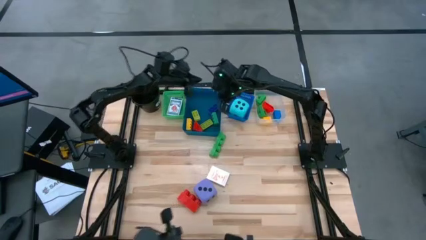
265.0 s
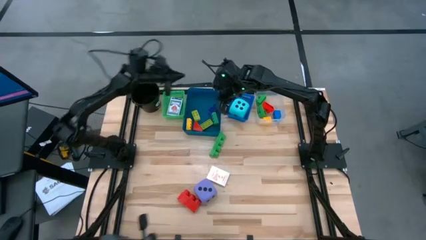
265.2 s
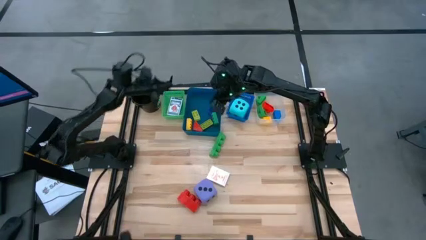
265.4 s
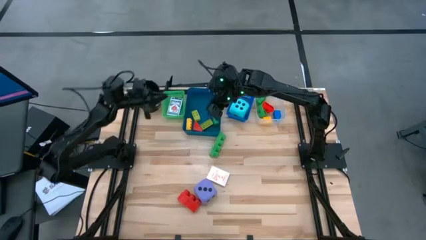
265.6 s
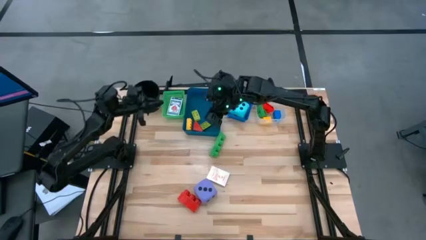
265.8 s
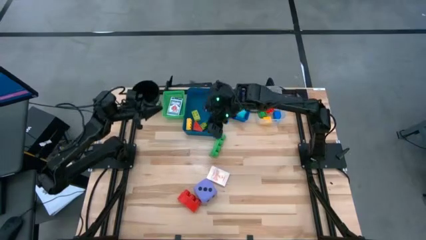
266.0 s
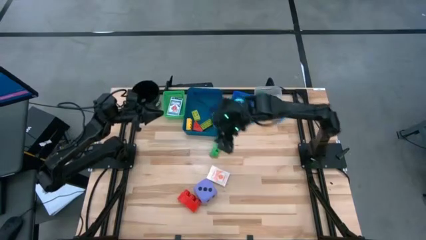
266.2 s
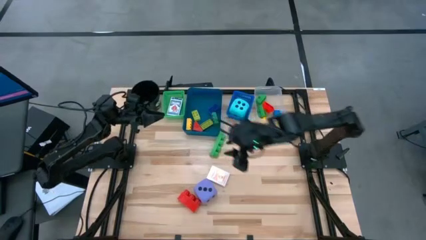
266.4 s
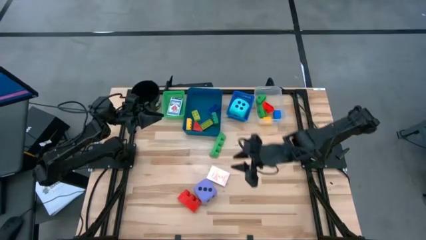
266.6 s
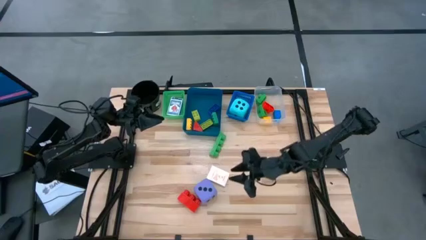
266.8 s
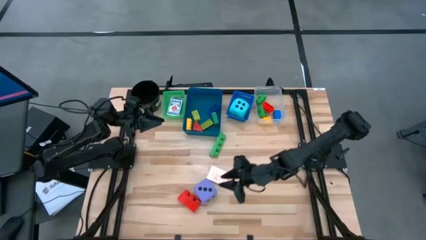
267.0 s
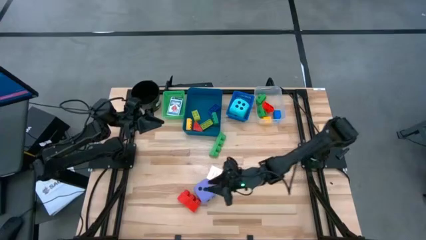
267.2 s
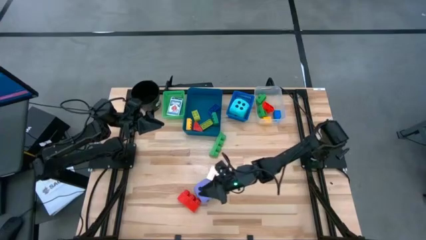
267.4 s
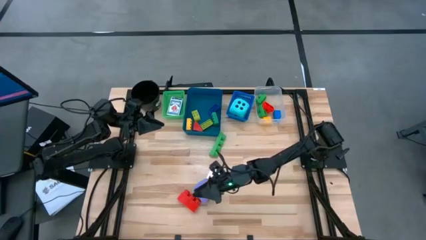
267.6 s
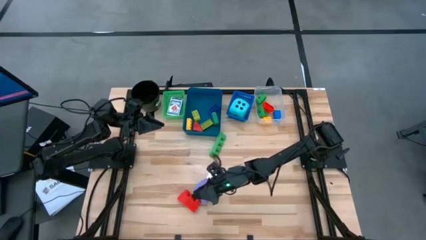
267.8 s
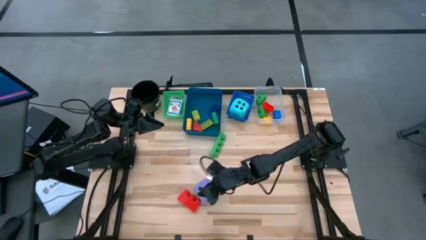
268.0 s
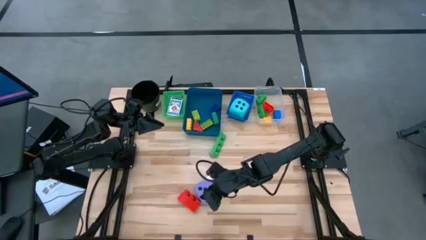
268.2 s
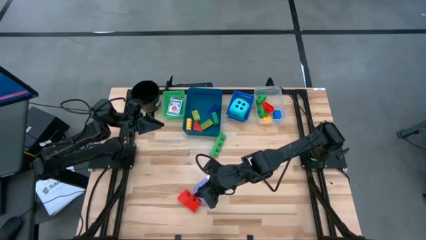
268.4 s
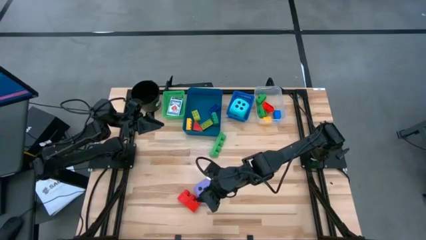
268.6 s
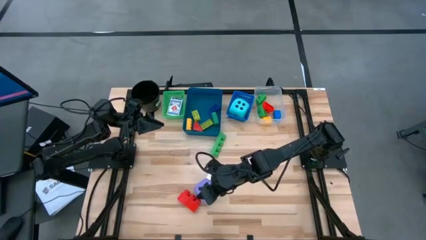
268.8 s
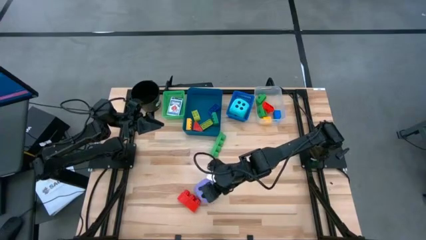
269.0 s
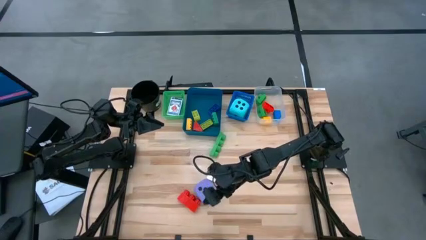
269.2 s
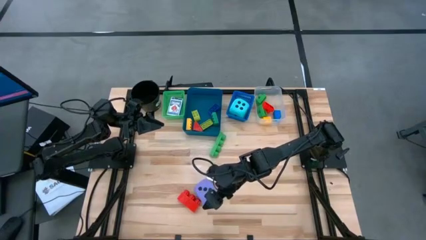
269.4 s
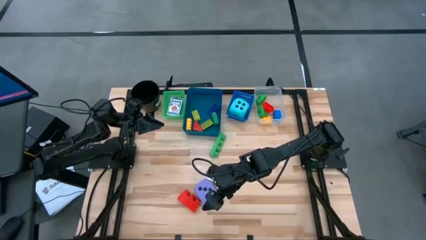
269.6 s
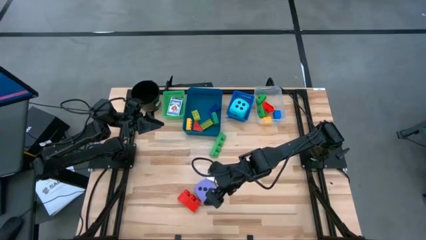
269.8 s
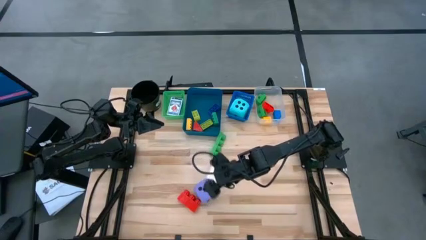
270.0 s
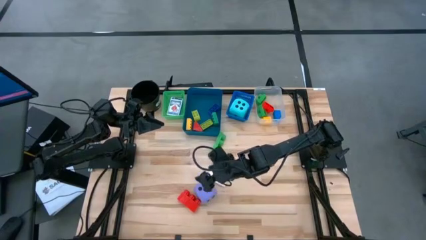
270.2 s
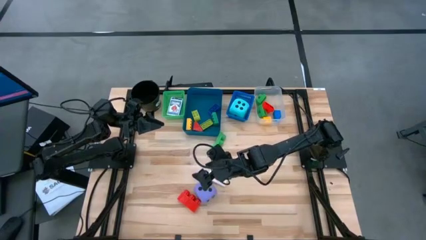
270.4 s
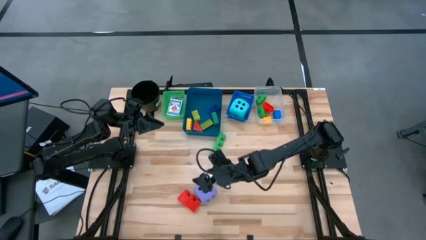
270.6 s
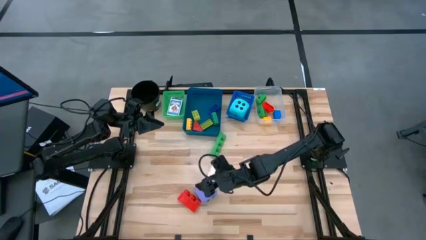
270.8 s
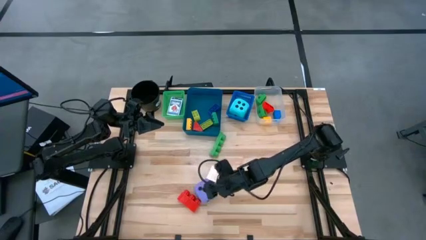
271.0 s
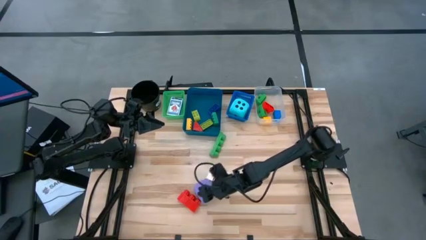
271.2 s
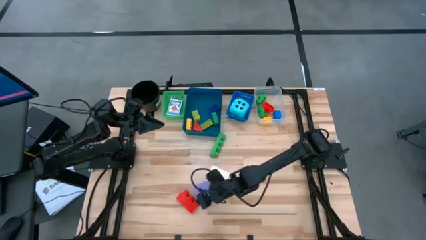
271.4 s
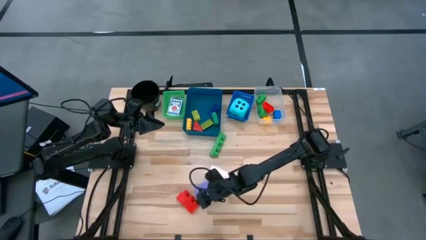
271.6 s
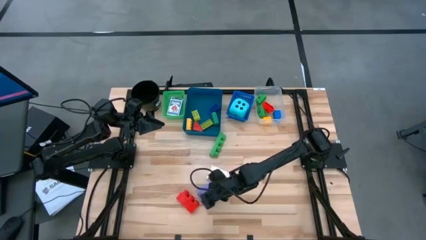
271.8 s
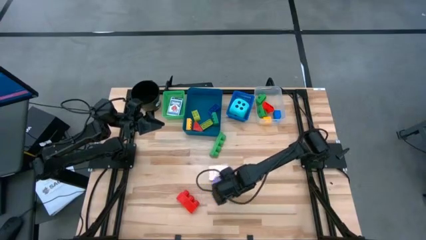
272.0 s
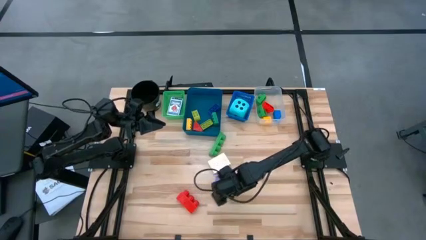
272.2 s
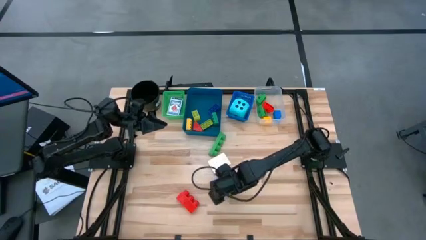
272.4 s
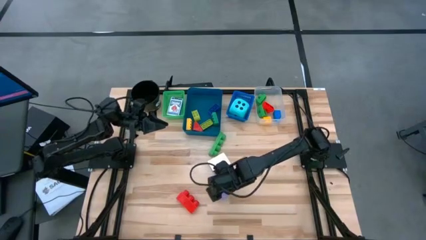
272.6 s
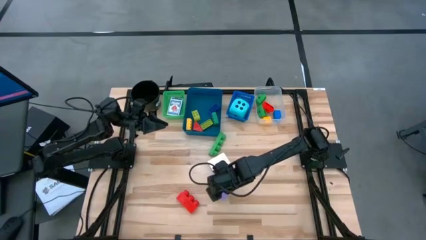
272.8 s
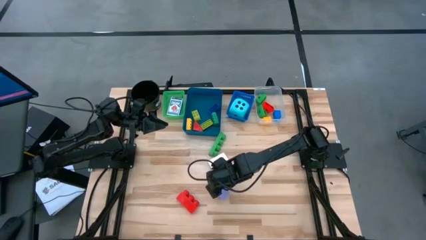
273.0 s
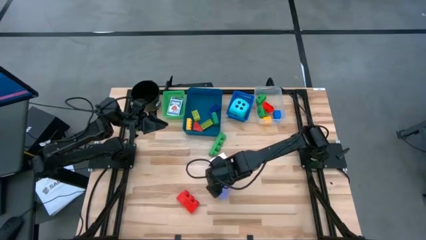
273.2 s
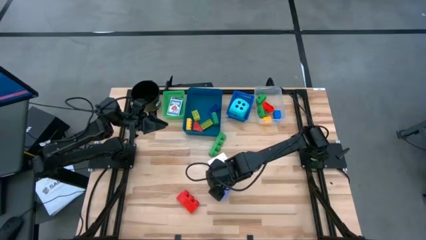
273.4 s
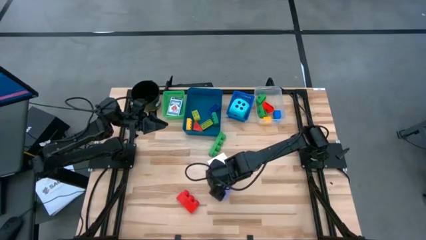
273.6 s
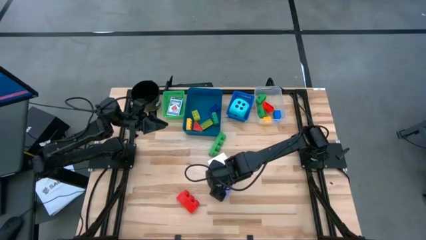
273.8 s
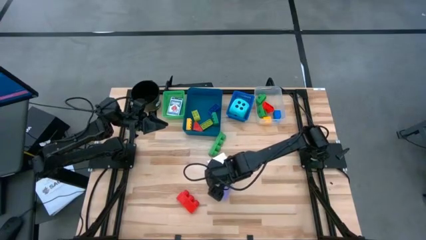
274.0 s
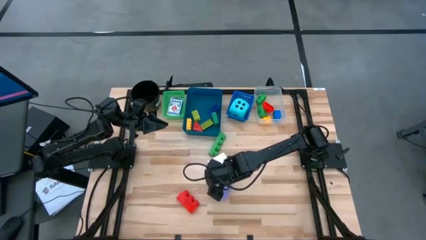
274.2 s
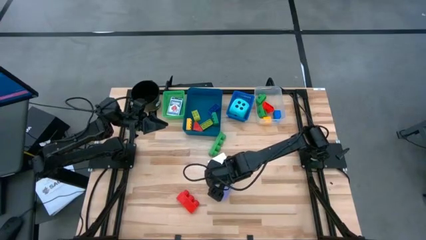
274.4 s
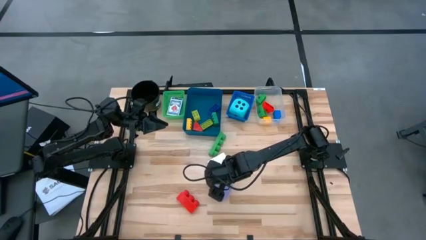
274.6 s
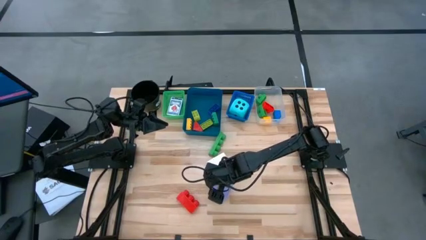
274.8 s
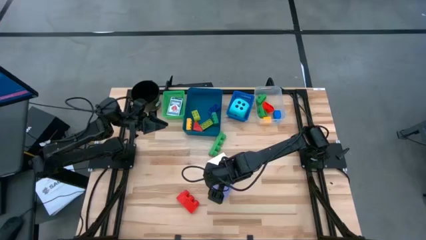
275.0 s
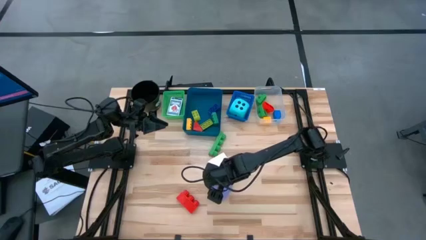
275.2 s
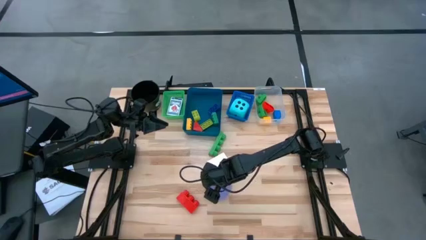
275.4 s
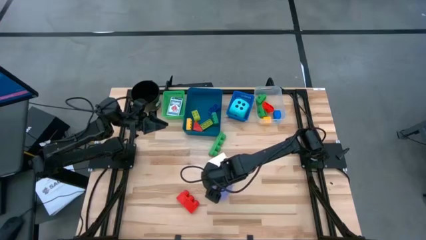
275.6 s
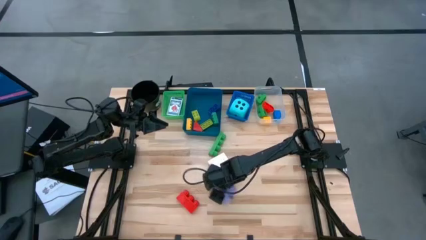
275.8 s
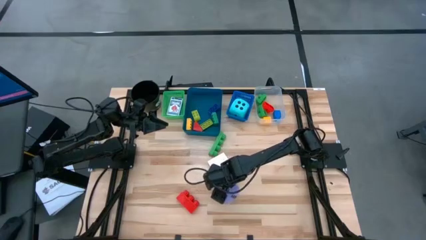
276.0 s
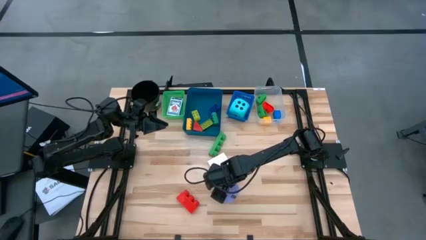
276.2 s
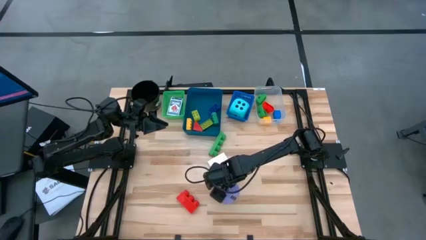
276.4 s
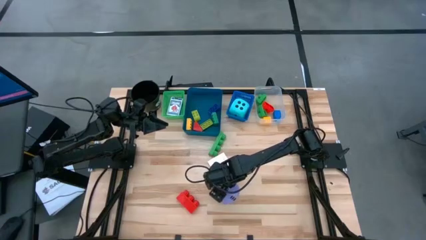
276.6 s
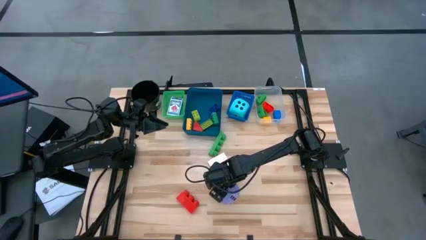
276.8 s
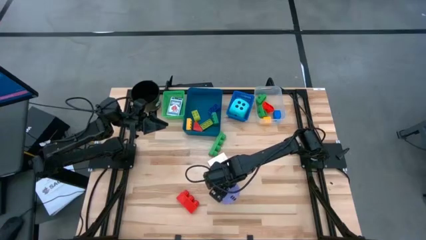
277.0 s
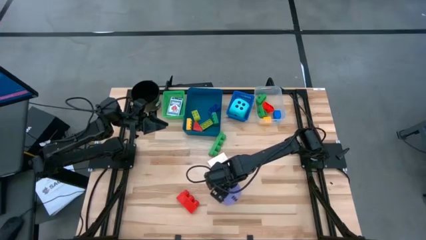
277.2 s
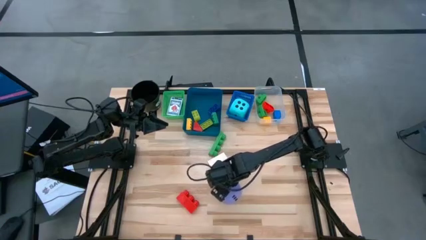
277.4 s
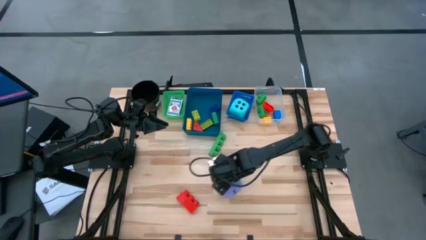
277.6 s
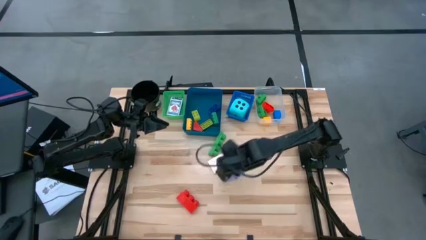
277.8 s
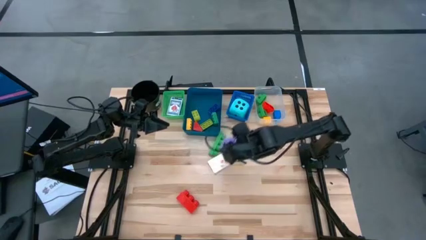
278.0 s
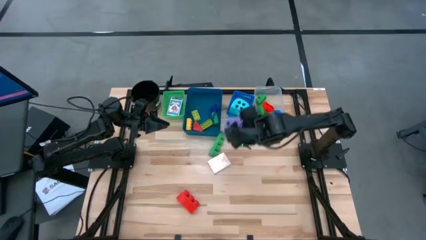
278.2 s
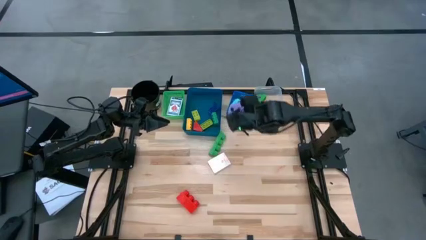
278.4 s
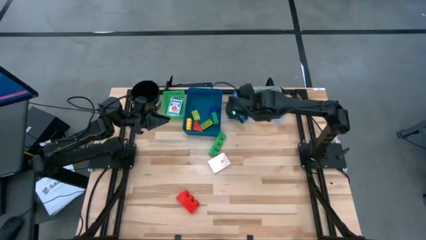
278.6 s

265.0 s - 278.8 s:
Task: Pick & Place Toys
Put the purple dice into the blue bin
